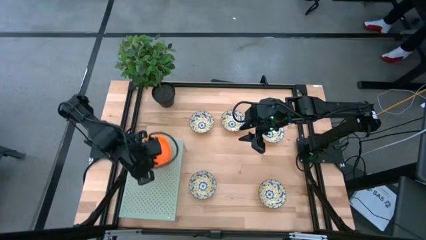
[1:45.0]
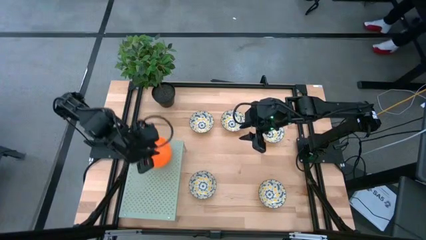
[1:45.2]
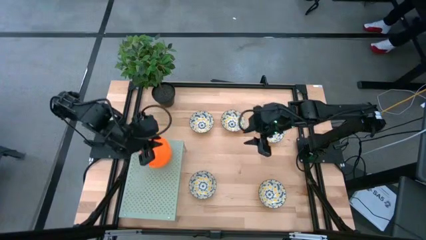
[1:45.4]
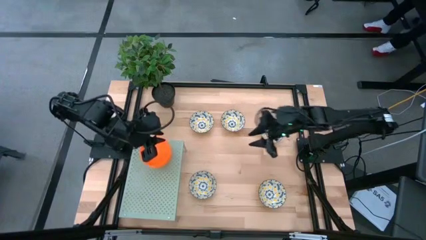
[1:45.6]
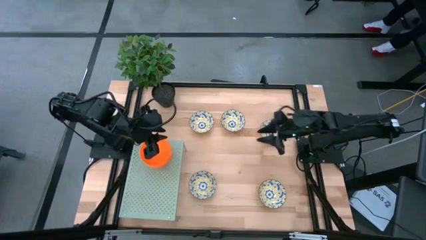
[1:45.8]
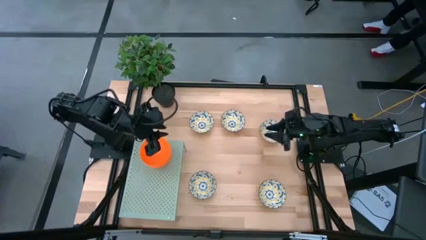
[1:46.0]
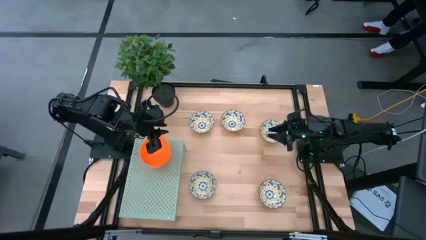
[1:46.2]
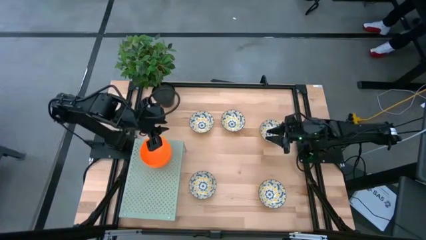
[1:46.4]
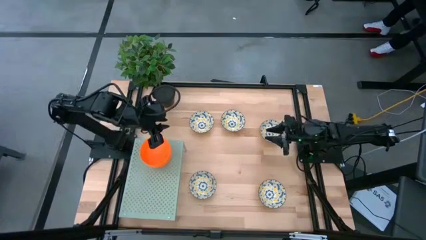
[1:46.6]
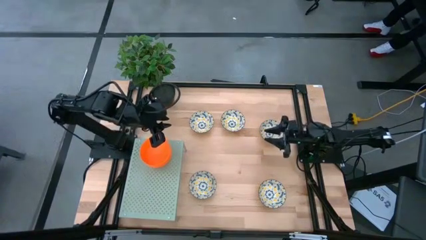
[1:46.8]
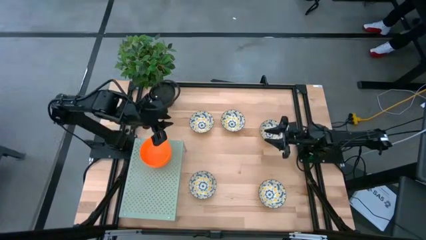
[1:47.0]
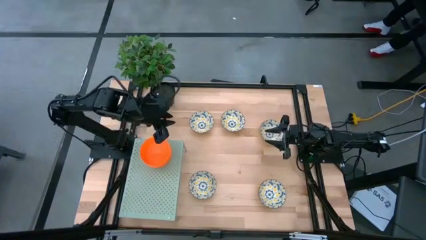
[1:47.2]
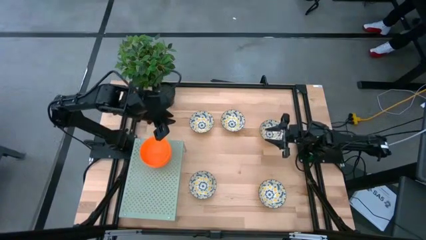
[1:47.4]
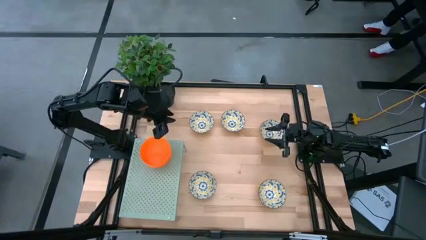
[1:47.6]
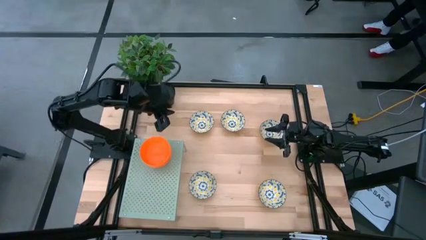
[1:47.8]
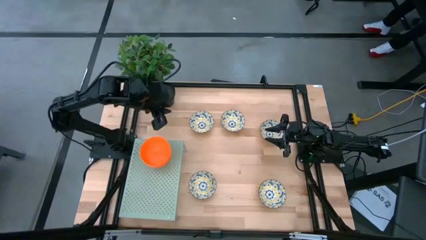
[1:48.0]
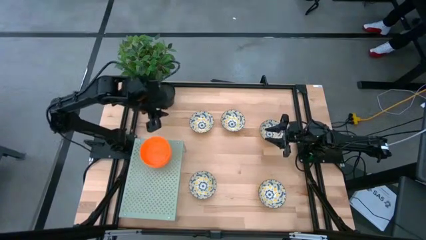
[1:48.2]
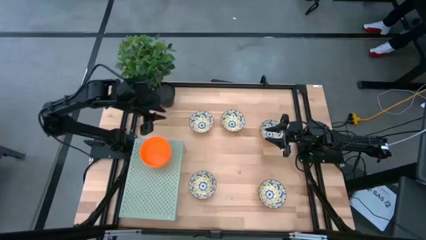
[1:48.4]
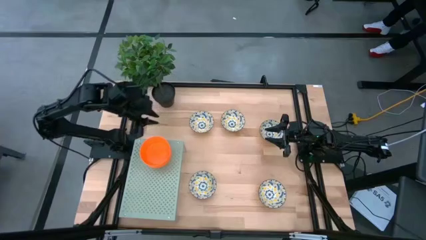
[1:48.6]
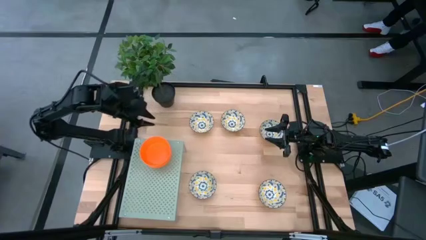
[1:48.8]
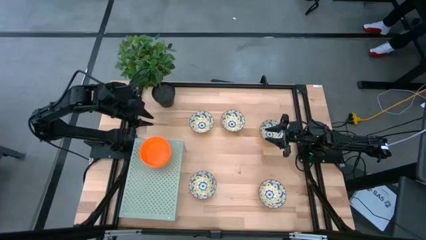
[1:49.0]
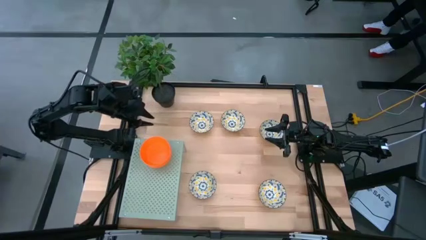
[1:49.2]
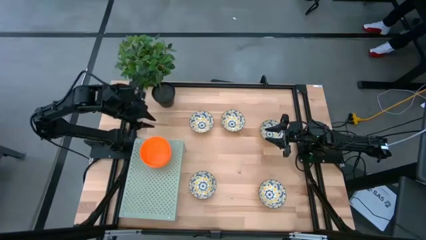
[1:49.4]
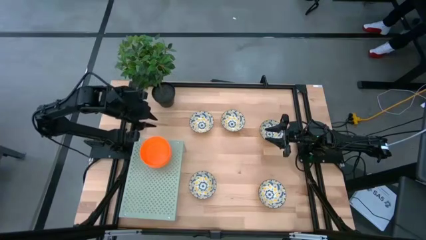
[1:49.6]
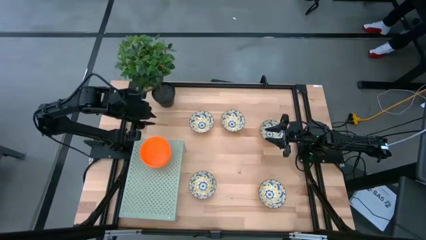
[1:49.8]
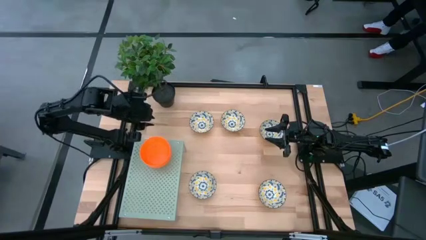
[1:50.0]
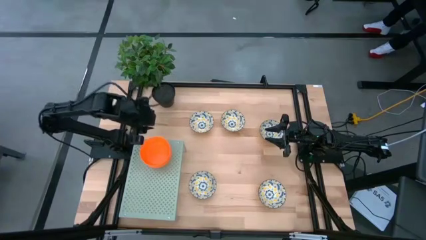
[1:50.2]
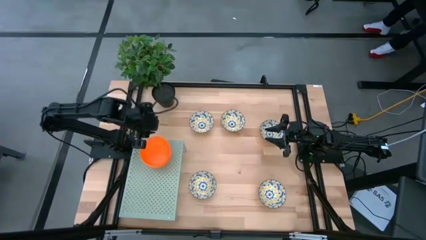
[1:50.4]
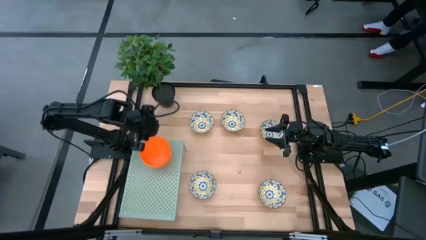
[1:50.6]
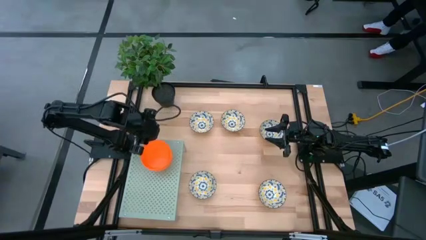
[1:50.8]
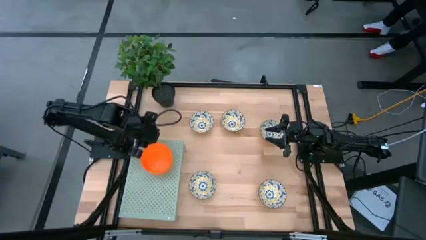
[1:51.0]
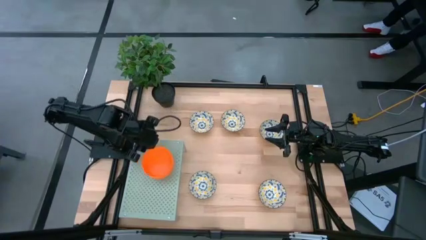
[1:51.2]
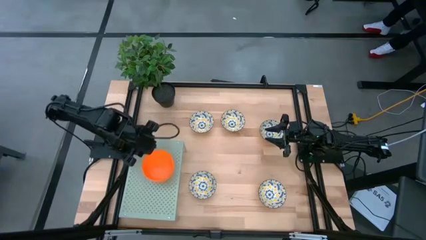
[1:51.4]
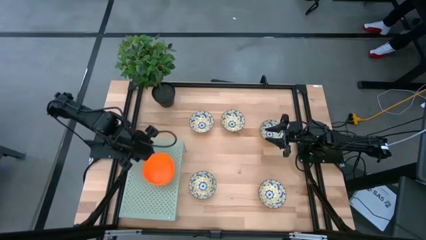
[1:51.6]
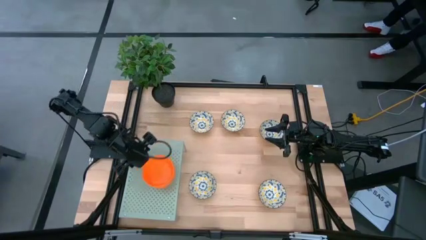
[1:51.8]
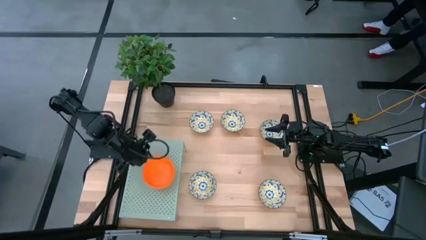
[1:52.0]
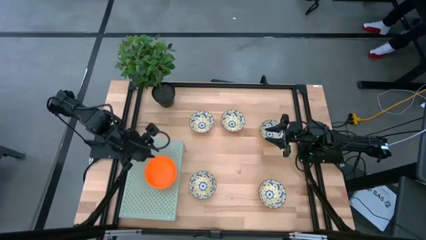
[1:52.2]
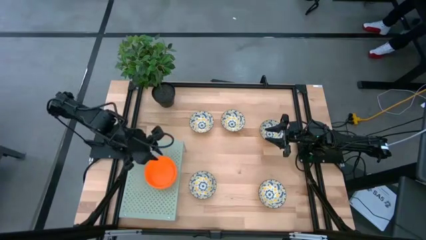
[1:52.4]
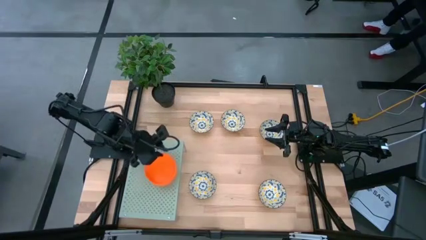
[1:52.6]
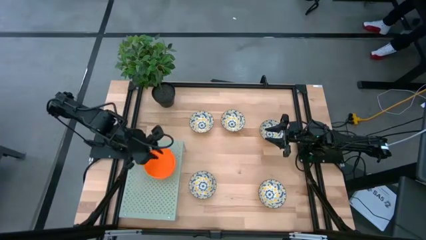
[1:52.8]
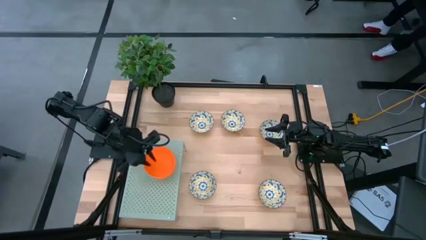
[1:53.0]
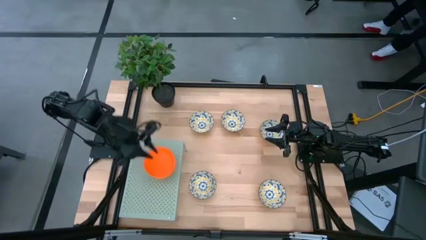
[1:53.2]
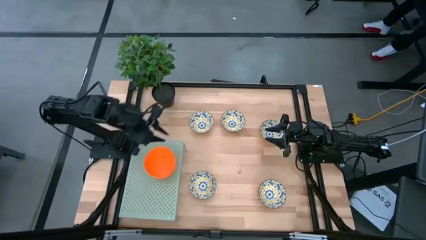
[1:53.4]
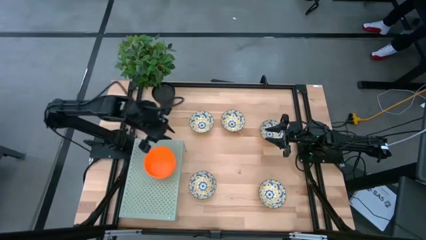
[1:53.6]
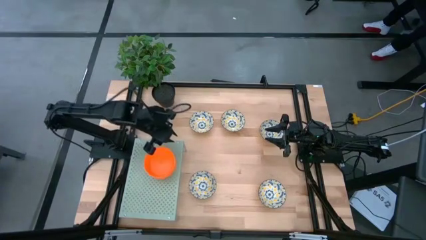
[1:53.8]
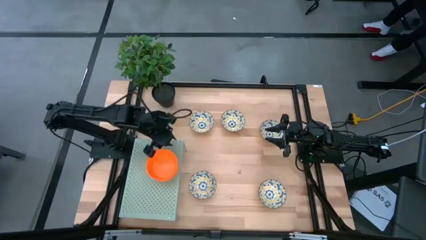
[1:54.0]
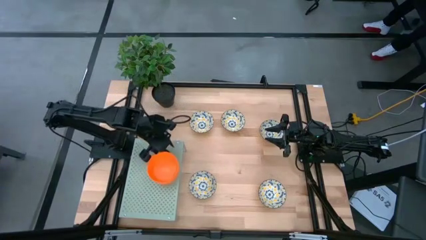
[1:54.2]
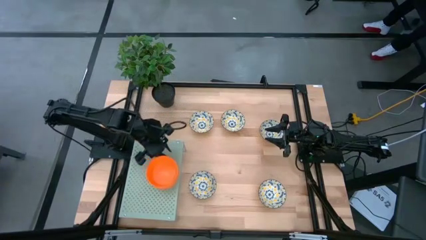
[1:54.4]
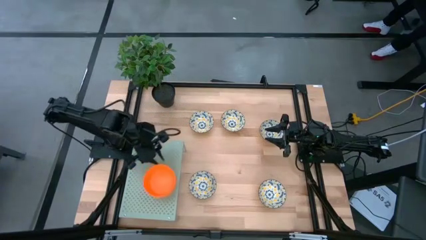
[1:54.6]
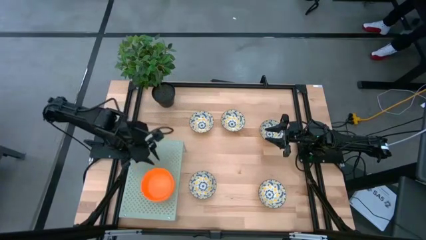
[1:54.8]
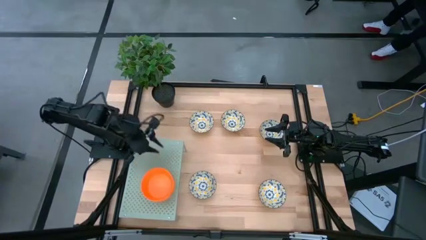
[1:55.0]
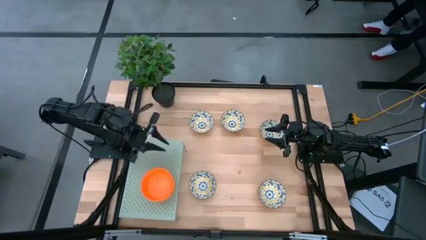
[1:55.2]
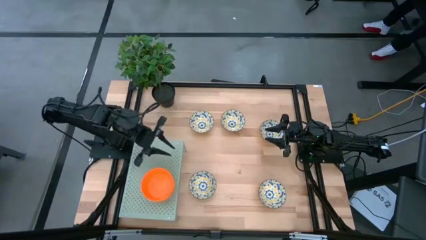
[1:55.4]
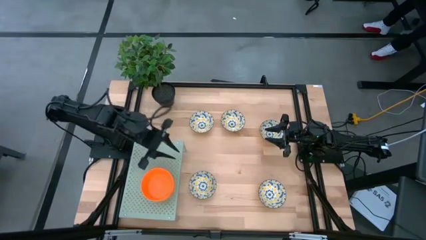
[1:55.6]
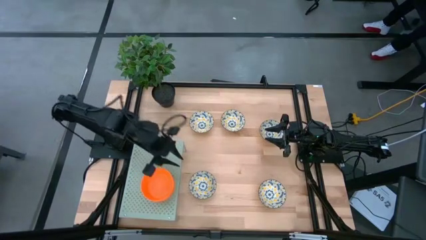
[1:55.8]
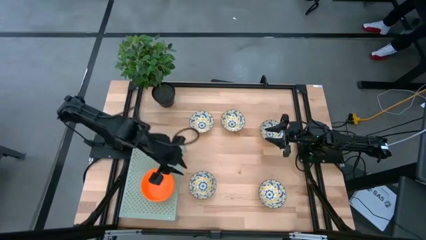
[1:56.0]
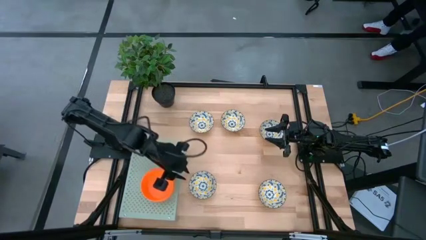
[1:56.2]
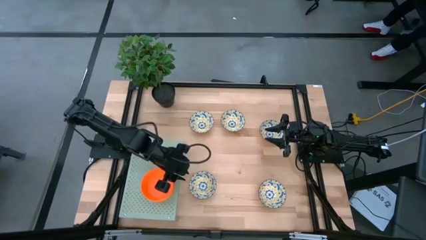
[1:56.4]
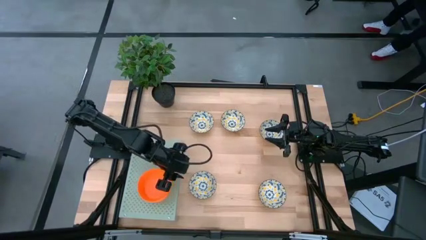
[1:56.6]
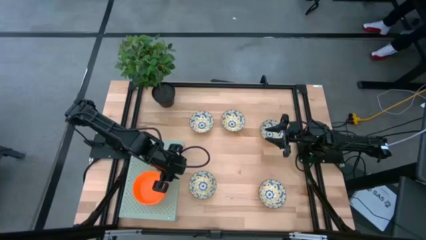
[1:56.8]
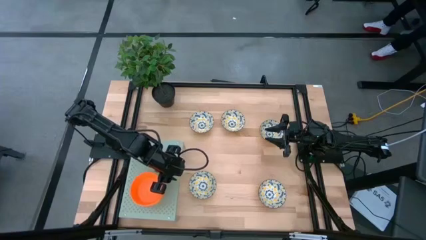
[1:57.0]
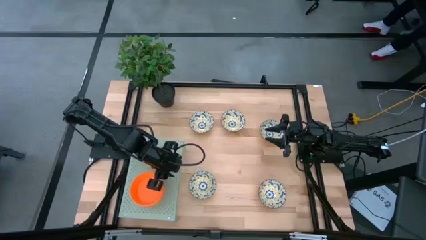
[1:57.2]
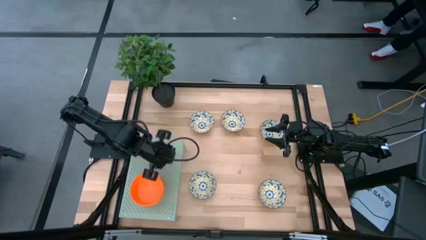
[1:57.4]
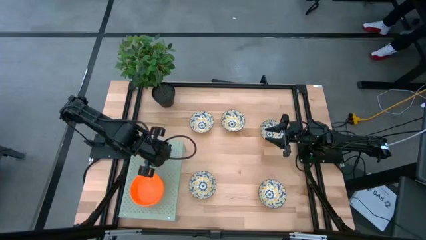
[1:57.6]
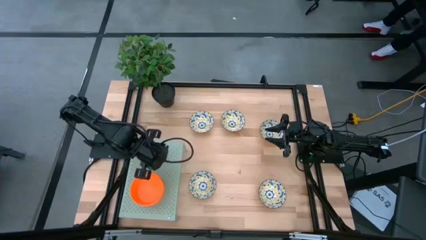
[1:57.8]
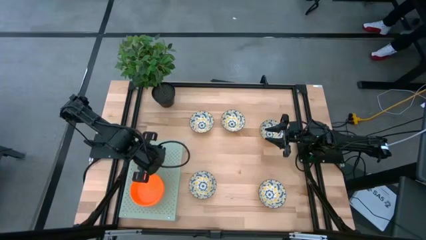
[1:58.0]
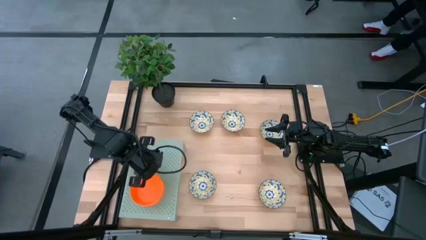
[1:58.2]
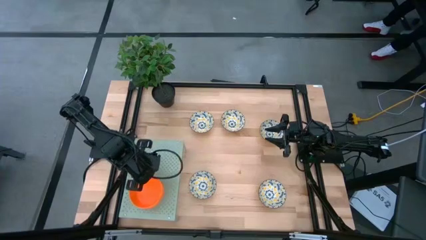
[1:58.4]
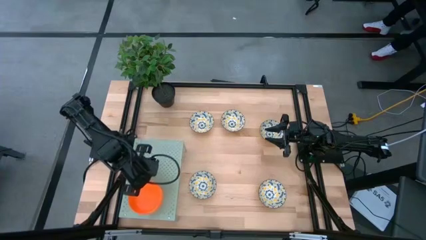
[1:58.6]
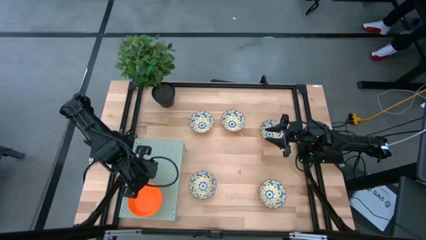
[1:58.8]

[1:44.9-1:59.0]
Task: Pick & Place Mini bowls
Move the orange stacked bowls to the bottom of the shelf

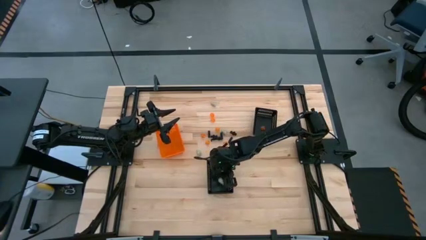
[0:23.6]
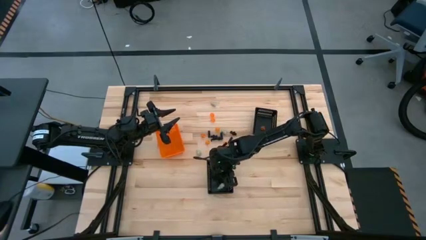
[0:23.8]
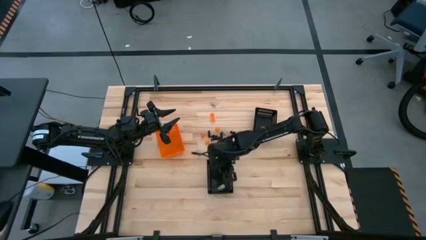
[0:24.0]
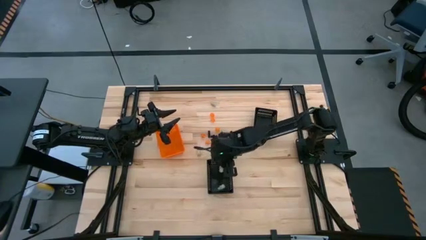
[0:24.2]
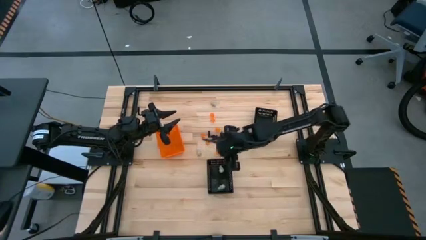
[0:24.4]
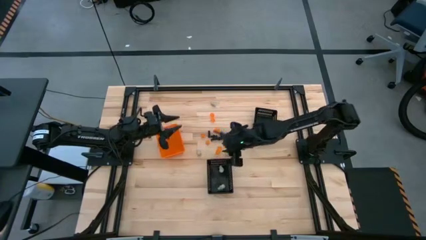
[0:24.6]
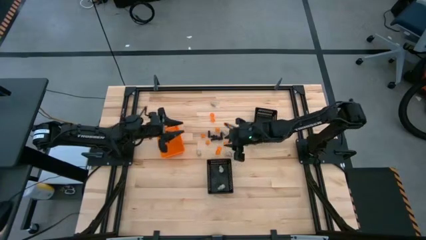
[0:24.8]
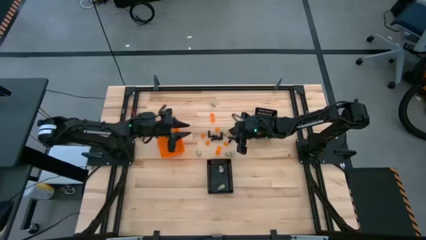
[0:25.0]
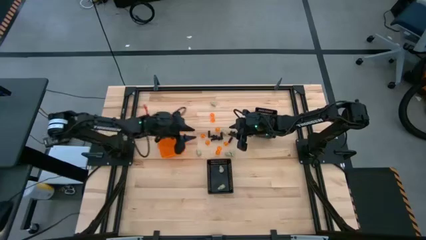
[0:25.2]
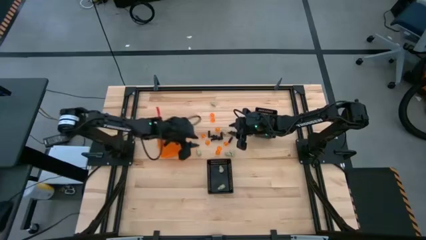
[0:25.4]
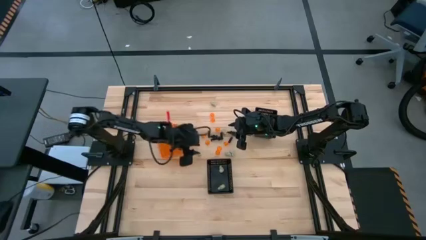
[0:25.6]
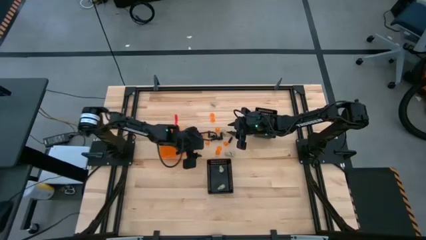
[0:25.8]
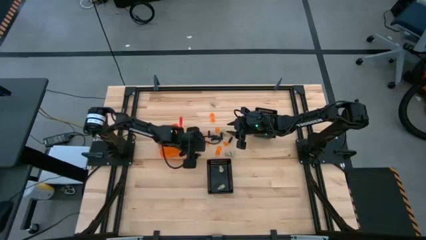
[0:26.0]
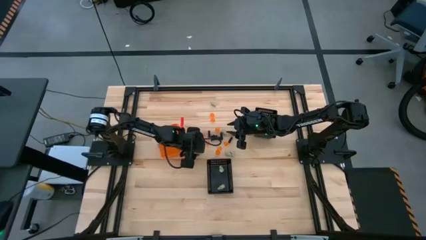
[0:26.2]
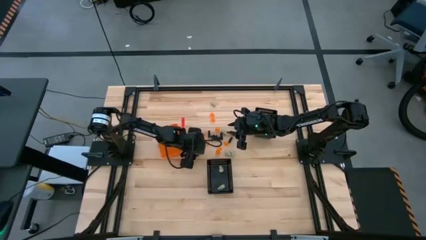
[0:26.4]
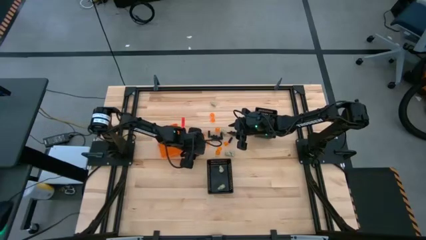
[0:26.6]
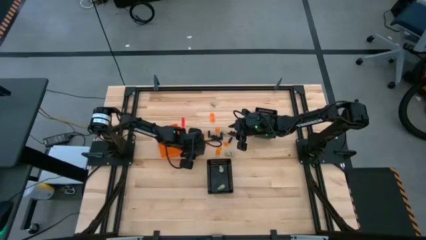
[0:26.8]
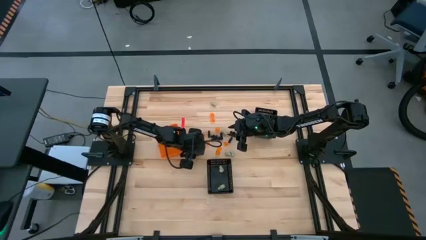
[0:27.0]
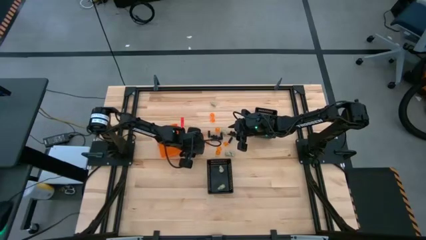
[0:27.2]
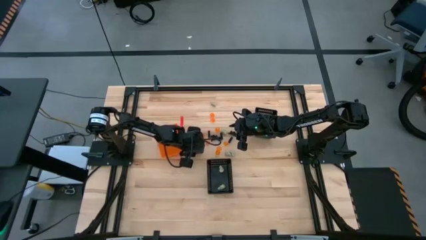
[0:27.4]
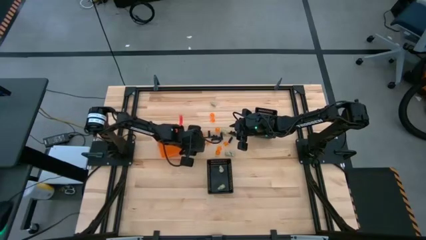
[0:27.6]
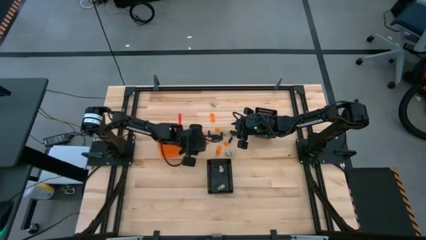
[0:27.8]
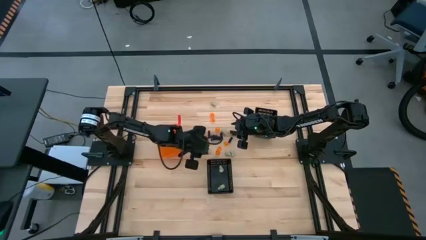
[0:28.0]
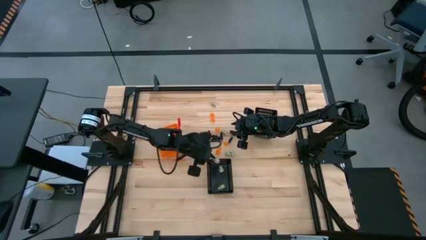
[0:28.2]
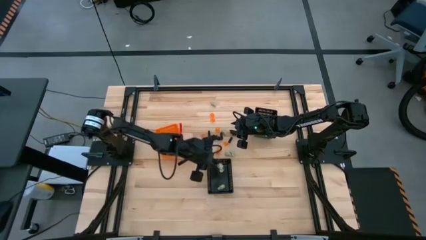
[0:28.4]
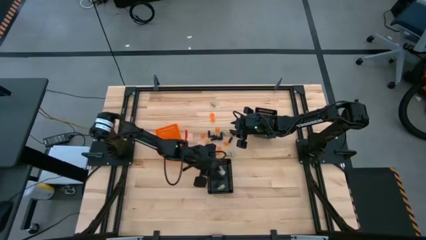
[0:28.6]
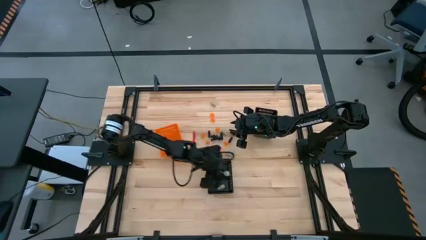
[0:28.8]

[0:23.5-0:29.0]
Task: Sort Halloween decoration
Put the white skull toy into the bottom black bin
